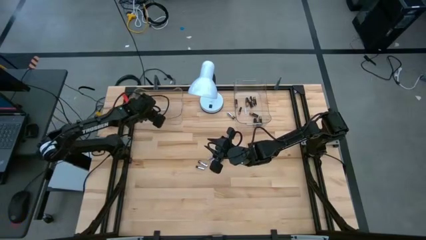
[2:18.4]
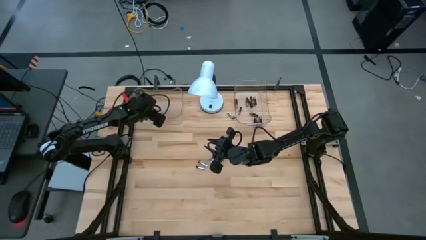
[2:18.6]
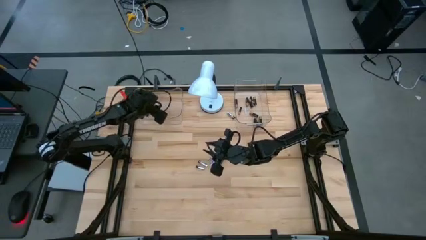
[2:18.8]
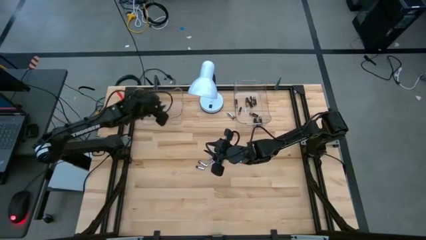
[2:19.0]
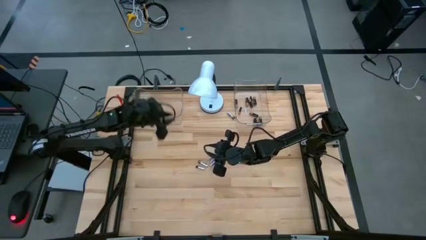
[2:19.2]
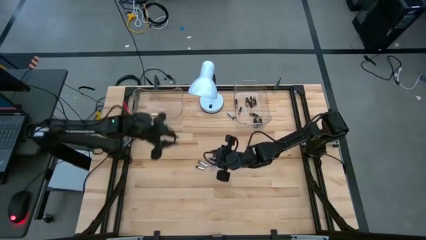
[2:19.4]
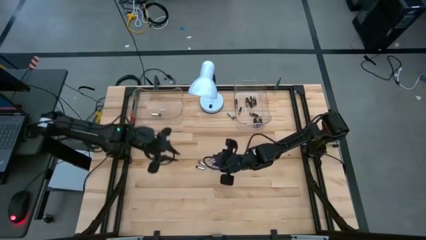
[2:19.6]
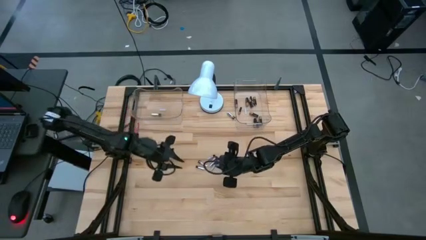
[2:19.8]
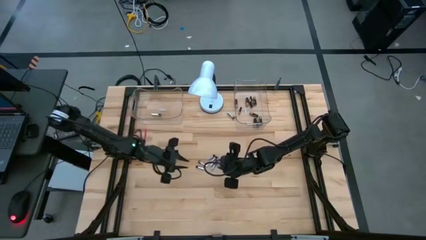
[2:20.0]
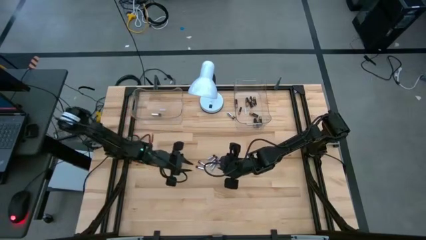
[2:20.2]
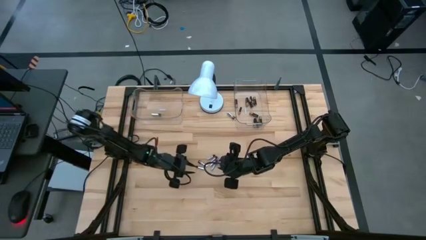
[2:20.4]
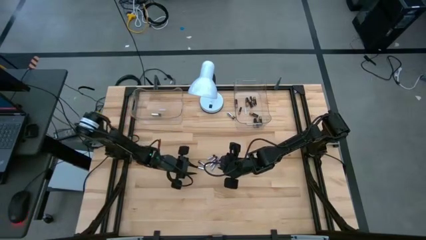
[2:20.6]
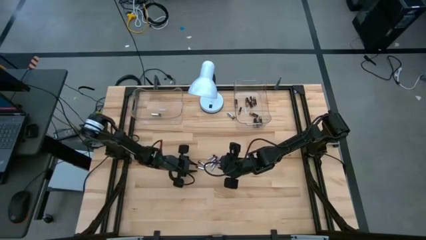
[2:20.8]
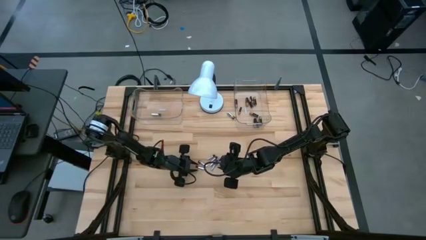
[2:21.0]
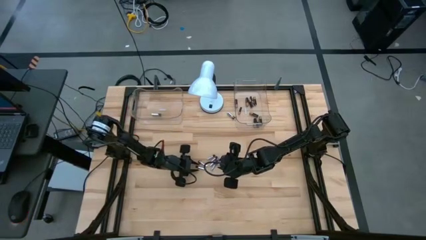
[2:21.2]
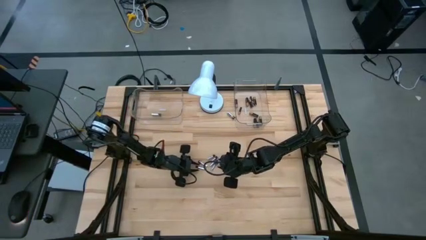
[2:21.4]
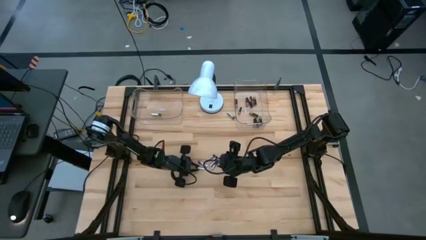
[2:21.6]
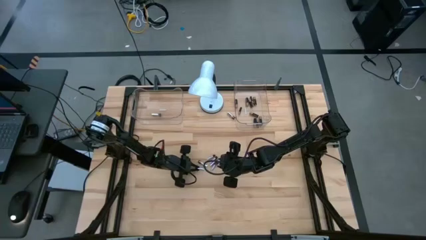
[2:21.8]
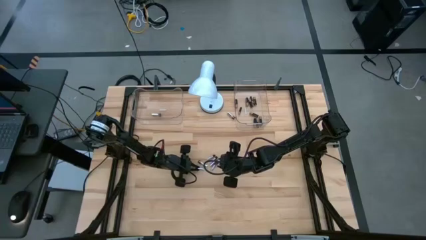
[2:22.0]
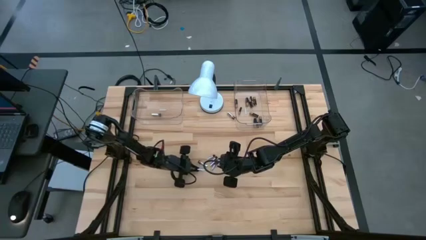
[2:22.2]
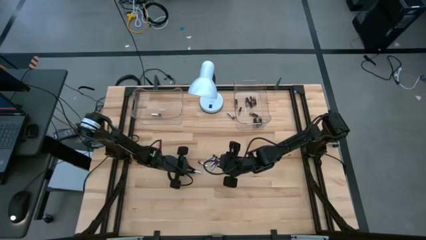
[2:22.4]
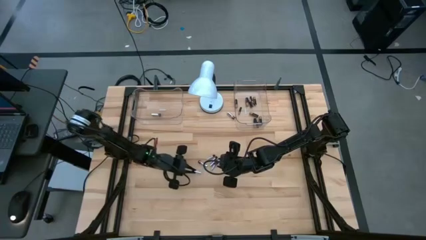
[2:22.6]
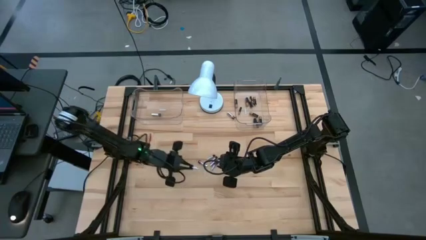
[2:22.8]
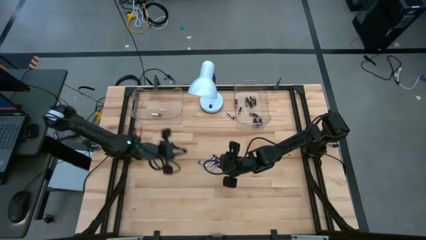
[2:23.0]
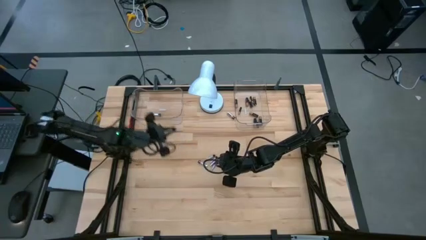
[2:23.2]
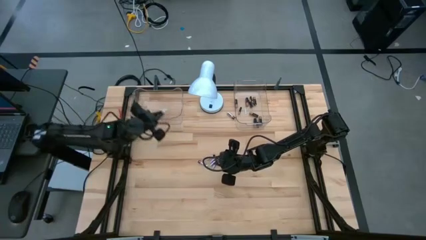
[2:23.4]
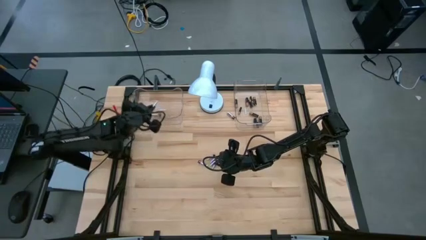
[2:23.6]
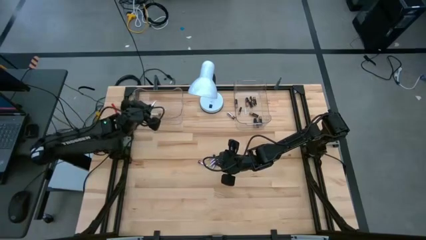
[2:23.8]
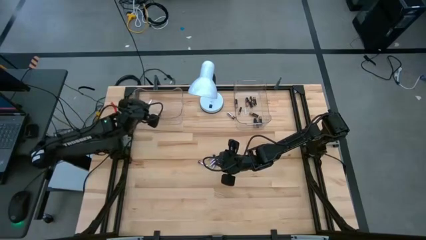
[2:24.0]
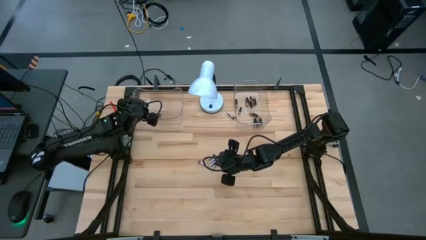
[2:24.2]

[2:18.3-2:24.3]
Task: Sort batteries
Put the silver battery in the transparent bin

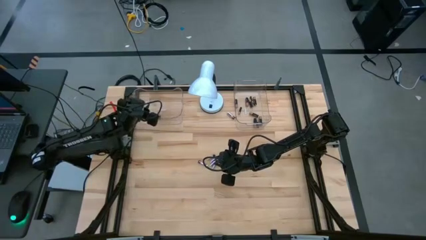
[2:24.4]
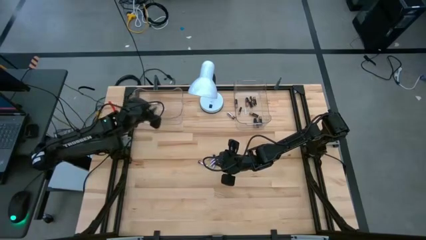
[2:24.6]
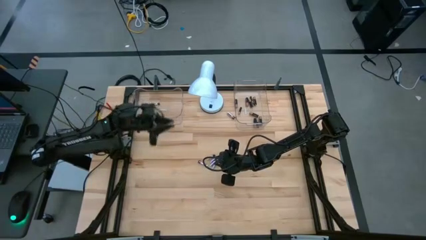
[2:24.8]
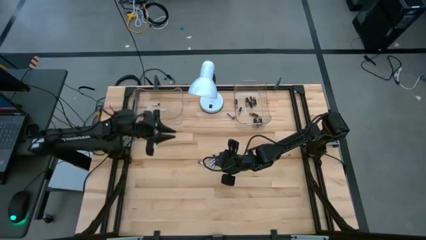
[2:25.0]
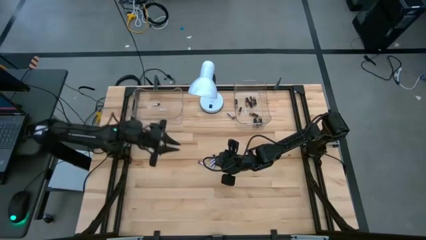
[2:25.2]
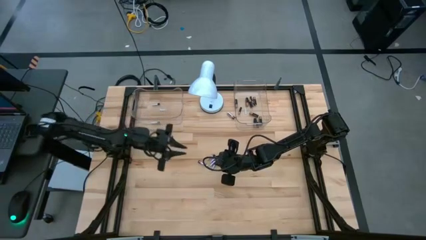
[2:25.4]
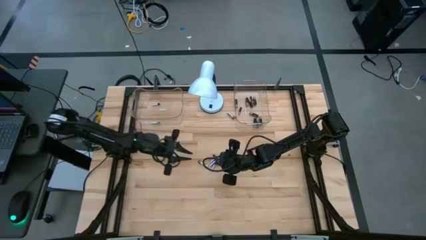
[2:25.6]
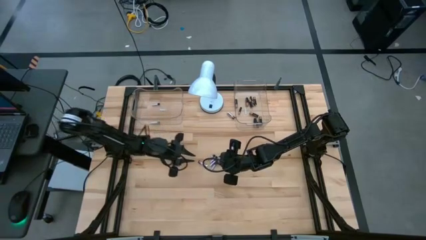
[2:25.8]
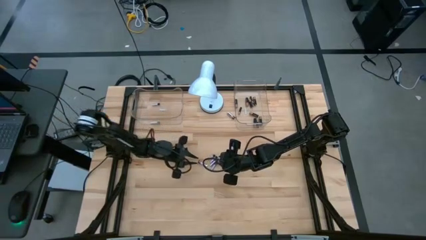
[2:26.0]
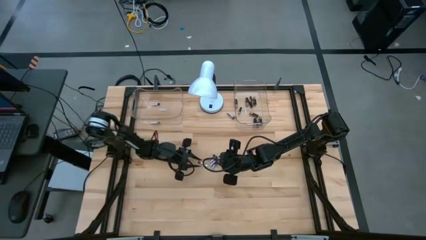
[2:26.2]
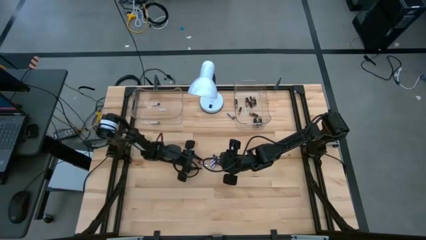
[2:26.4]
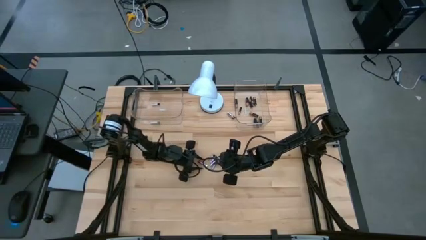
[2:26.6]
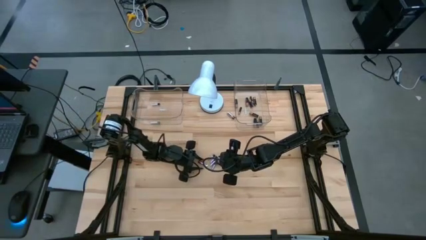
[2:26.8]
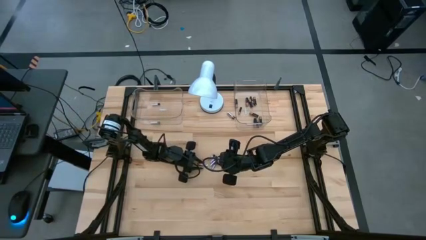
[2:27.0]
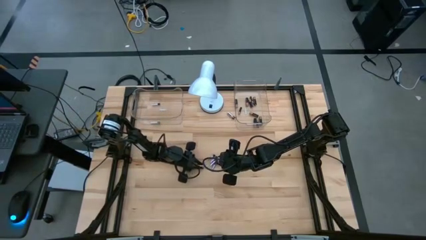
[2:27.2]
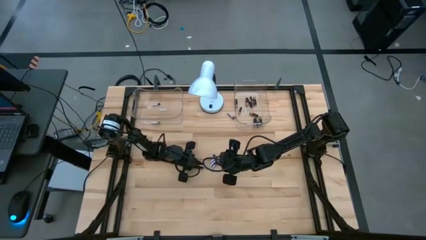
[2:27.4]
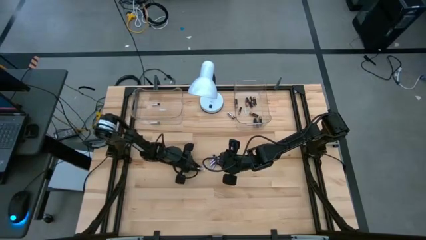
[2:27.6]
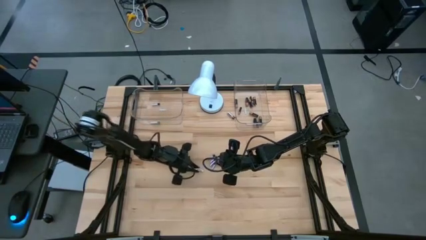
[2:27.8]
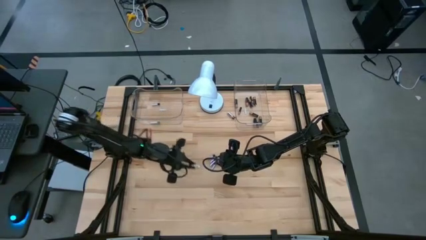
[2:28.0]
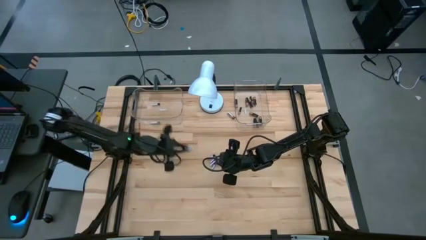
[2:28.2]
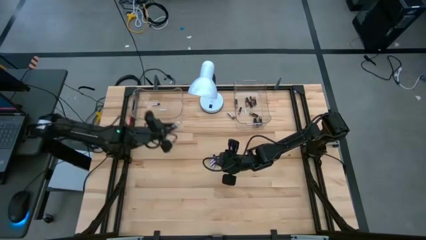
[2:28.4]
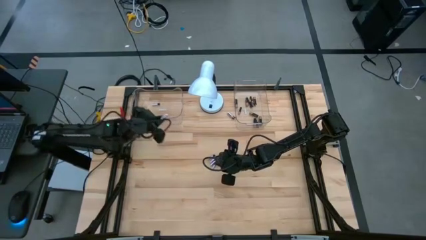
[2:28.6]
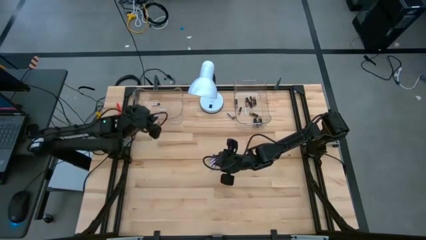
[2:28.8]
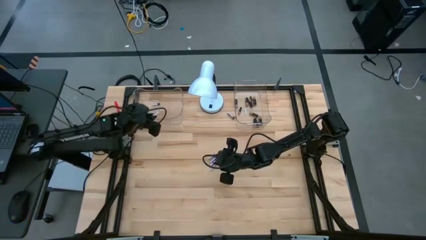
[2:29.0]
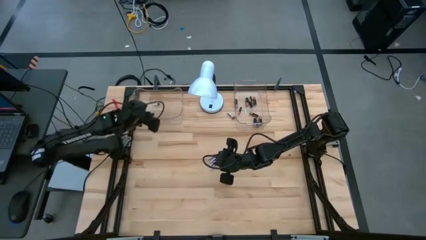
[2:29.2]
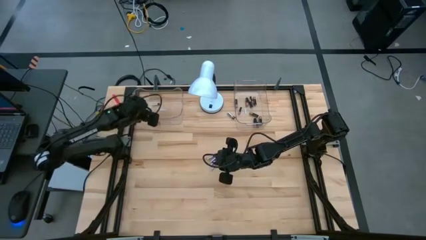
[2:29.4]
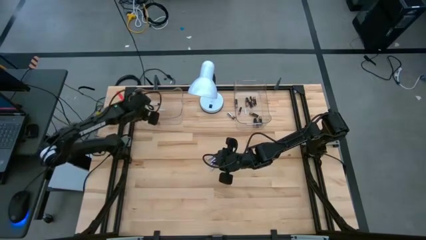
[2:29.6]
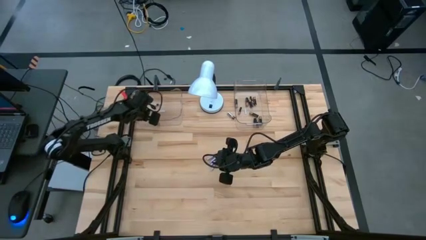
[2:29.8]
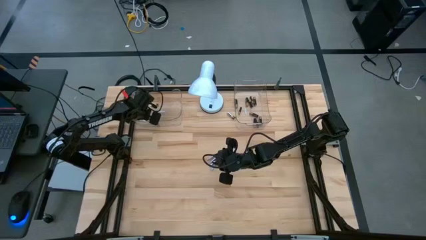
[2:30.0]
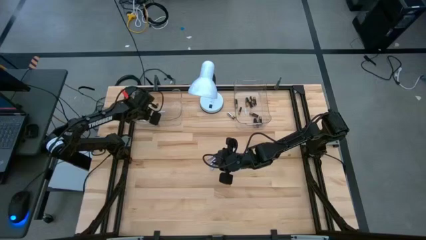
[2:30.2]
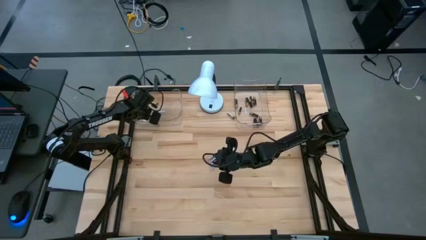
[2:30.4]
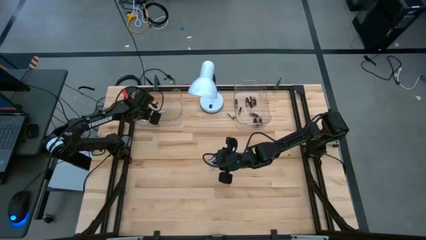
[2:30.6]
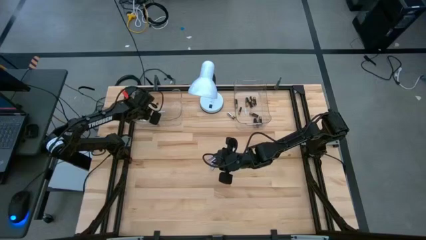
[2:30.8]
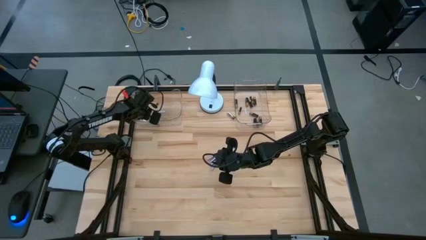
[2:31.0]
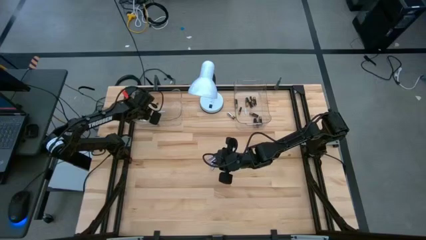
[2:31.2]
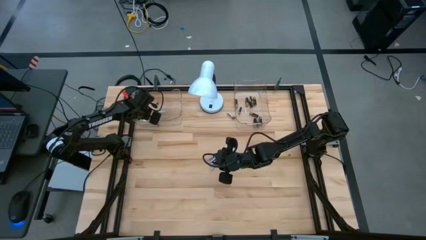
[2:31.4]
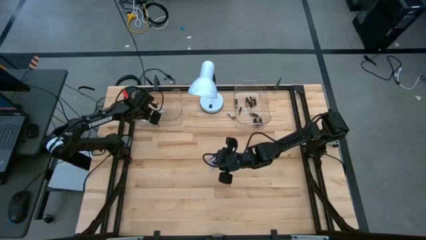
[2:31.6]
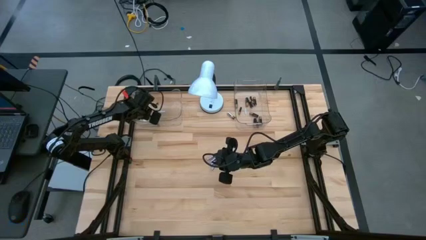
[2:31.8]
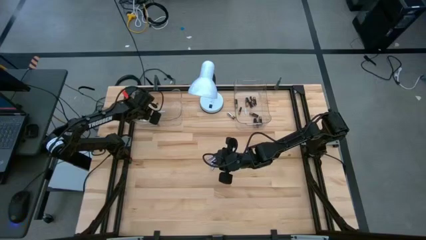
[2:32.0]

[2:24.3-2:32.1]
Put the silver battery in the transparent bin

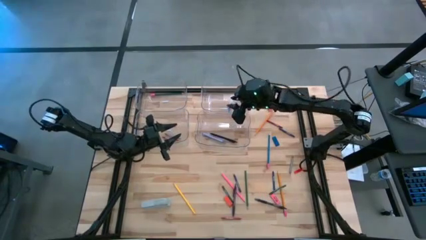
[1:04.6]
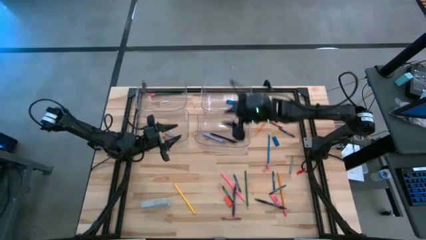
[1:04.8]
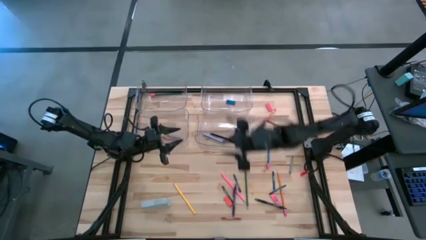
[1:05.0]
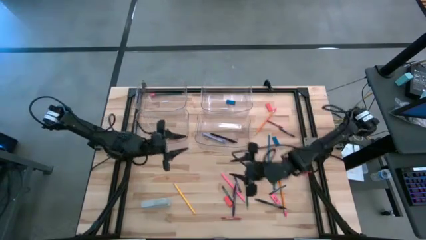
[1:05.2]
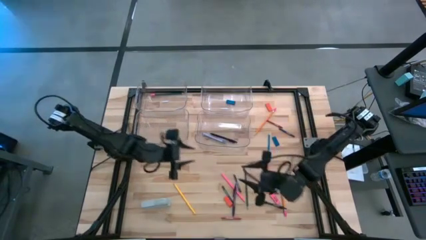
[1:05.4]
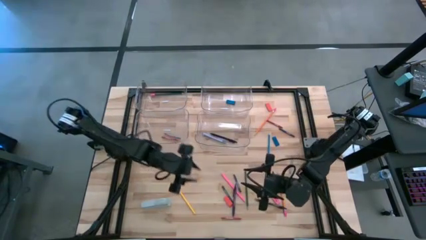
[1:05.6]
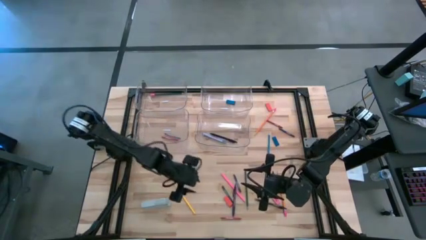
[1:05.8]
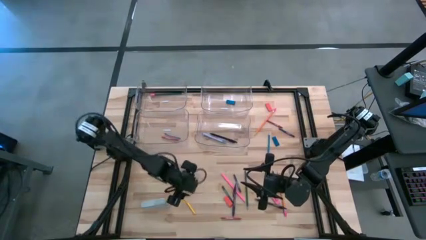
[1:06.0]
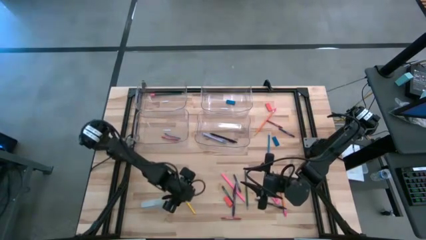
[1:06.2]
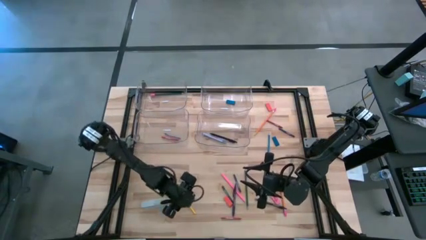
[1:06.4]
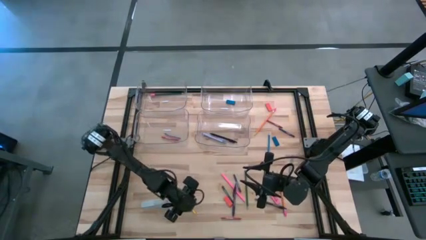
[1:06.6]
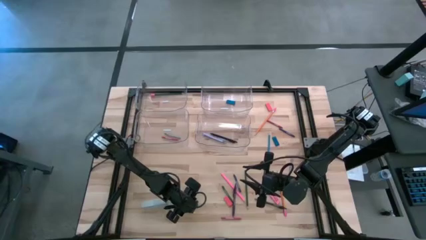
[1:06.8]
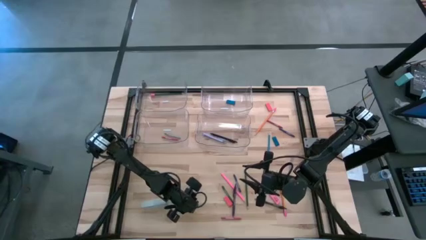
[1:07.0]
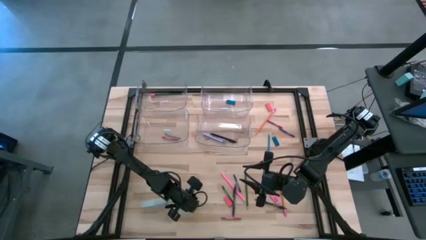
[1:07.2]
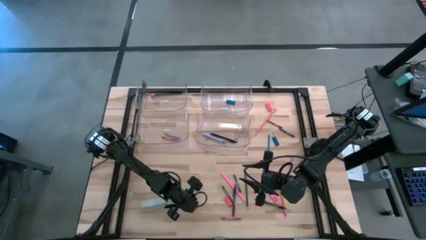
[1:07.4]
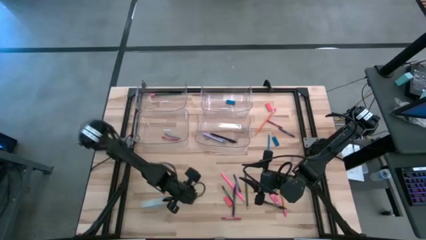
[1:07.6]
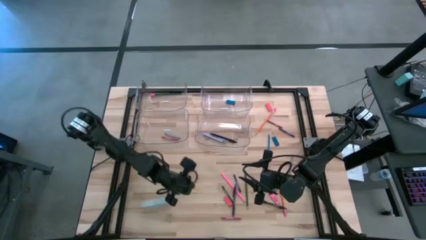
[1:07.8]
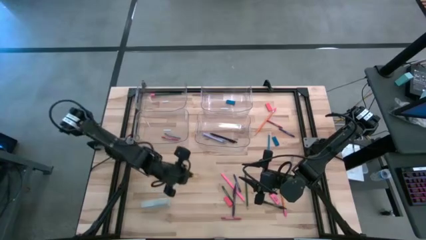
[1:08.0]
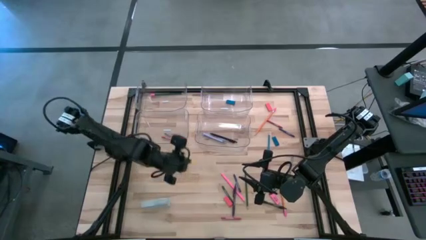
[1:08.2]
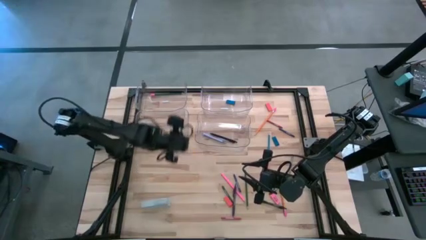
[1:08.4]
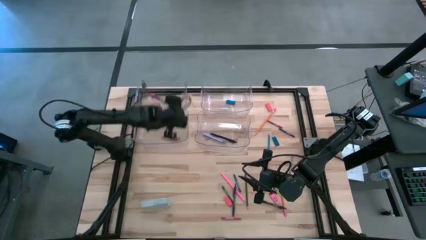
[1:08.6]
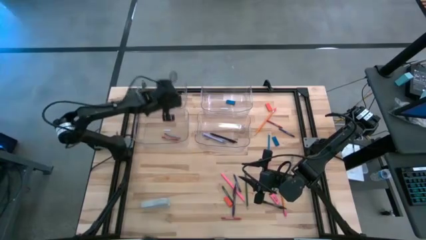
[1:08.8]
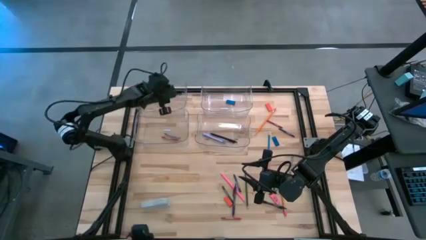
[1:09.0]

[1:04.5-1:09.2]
Task: Sort crayons/erasers/pens/pencils in bins
Put the yellow pencil into the top left transparent bin
